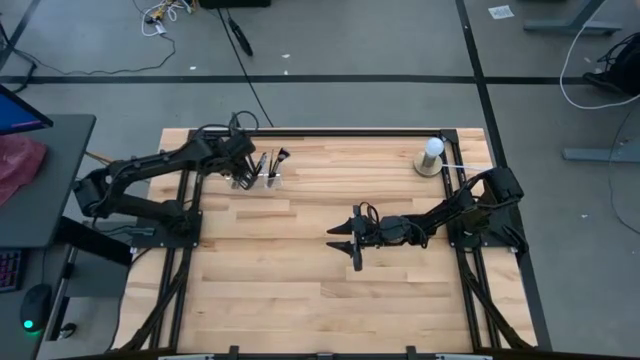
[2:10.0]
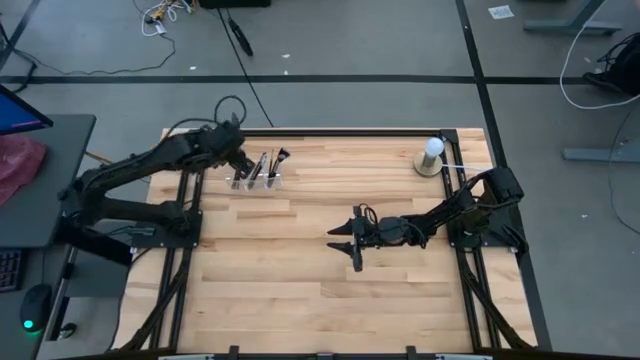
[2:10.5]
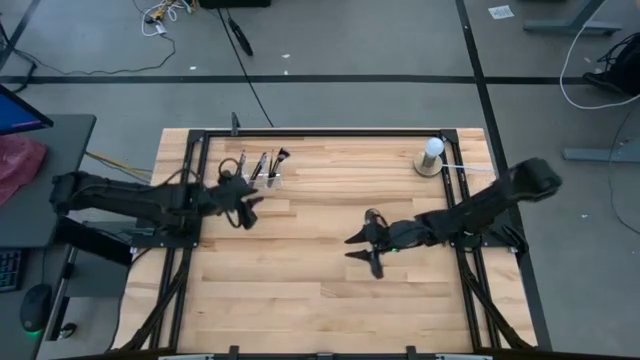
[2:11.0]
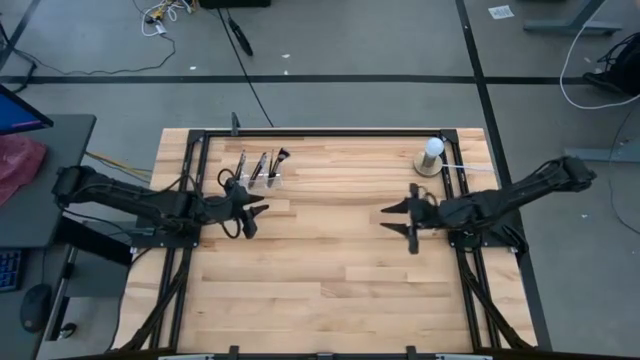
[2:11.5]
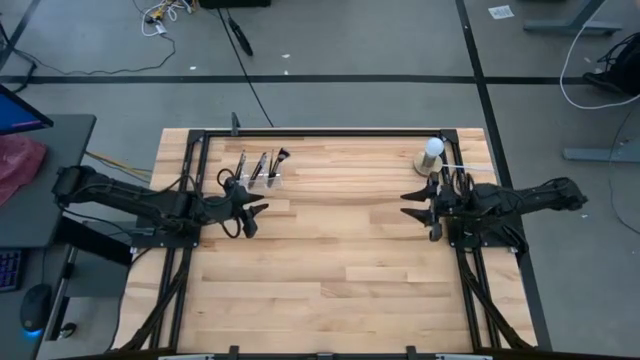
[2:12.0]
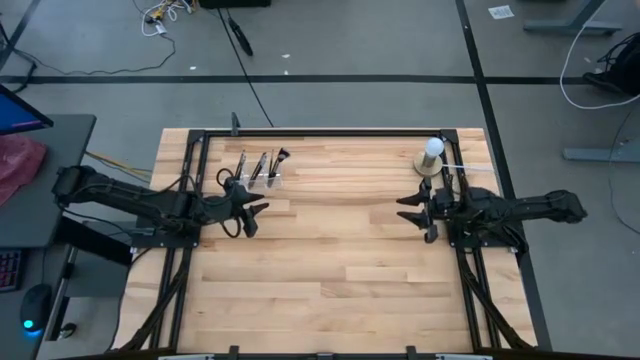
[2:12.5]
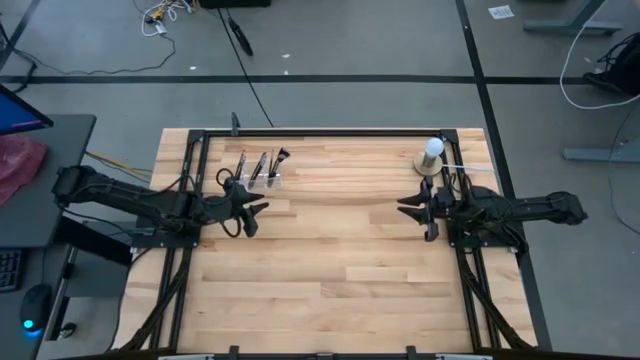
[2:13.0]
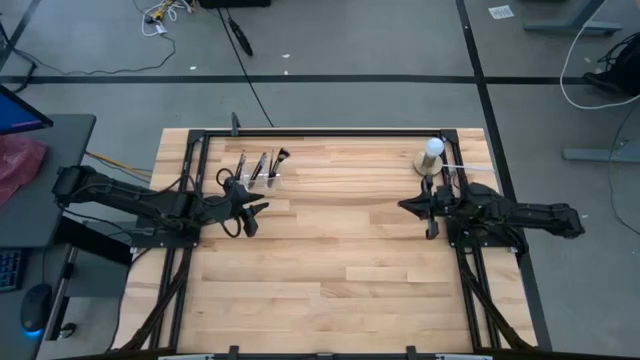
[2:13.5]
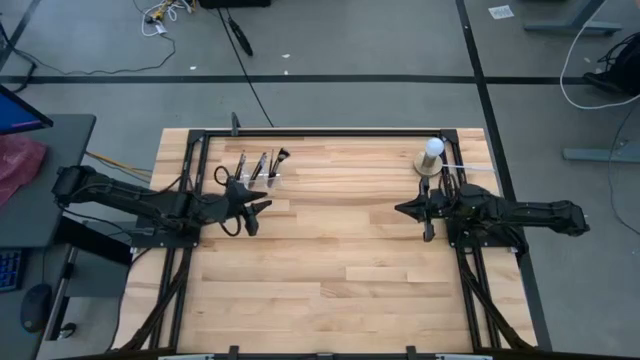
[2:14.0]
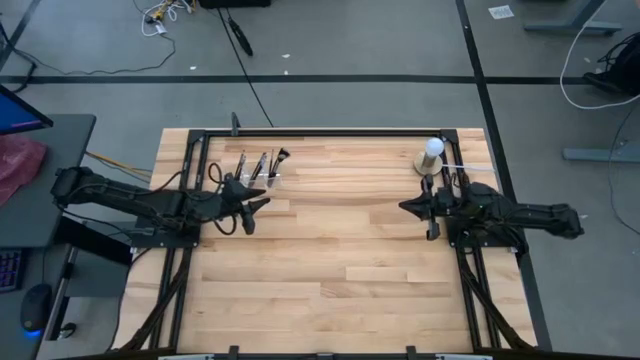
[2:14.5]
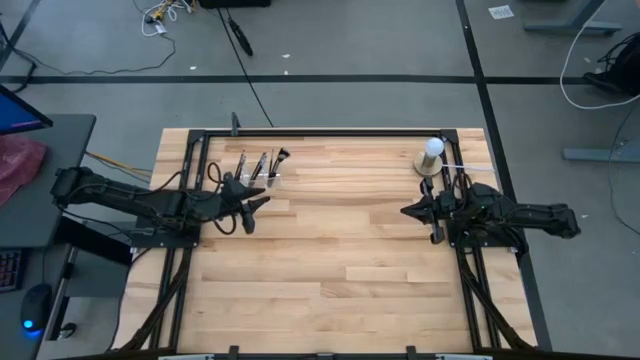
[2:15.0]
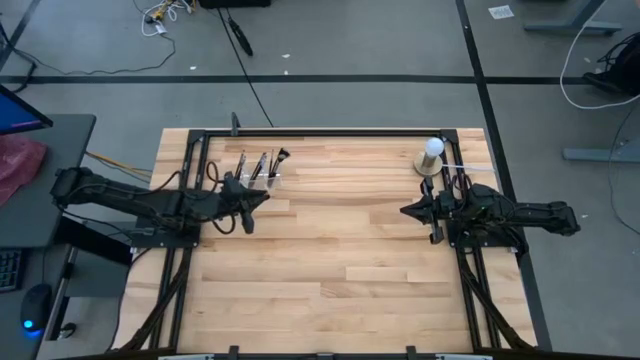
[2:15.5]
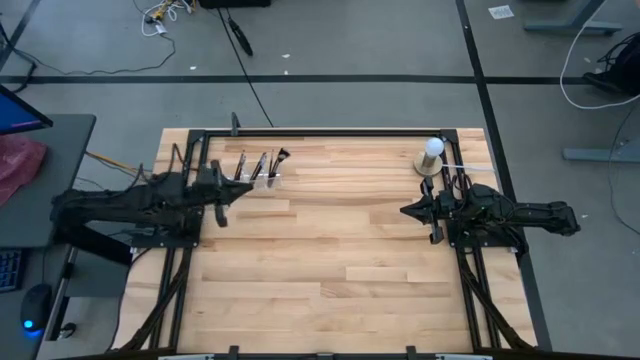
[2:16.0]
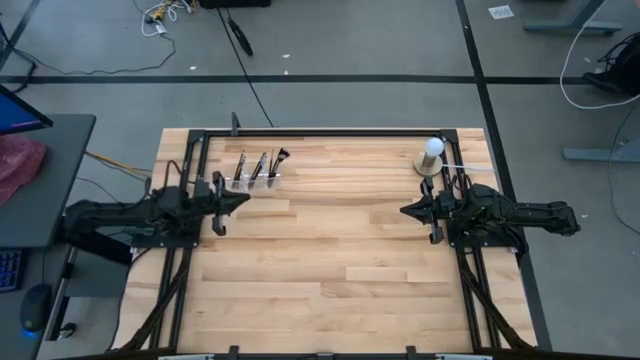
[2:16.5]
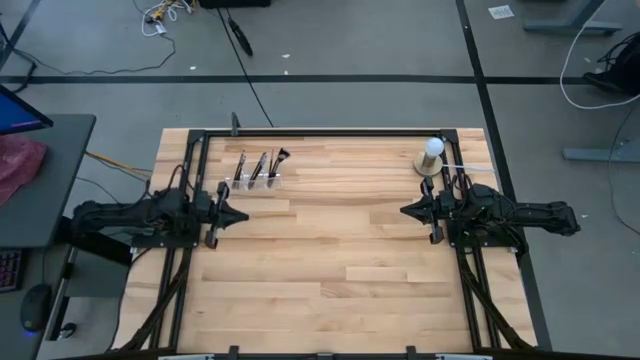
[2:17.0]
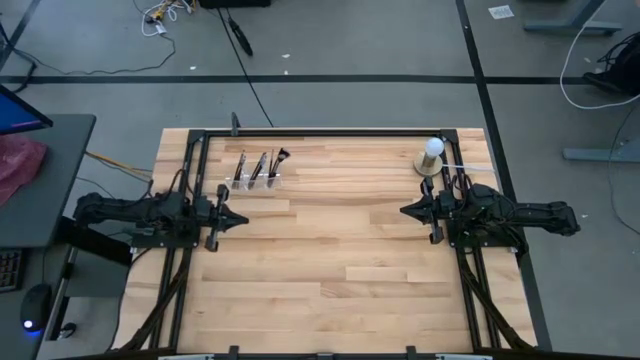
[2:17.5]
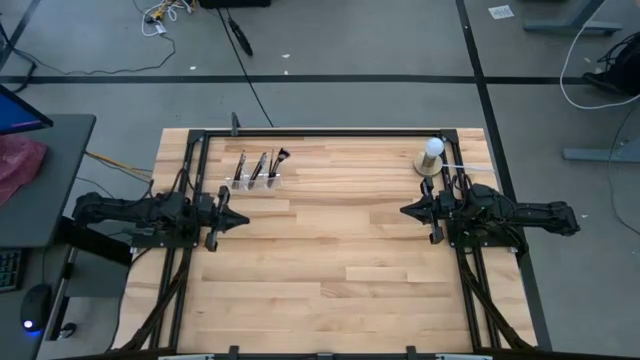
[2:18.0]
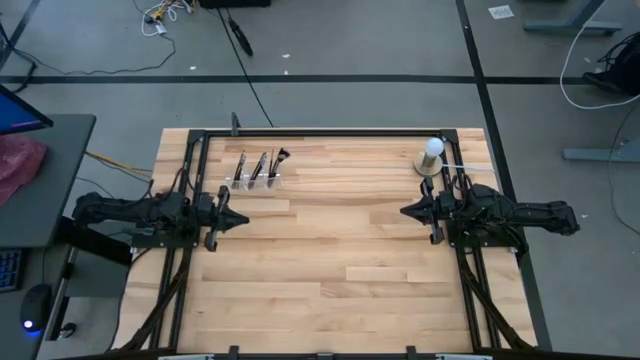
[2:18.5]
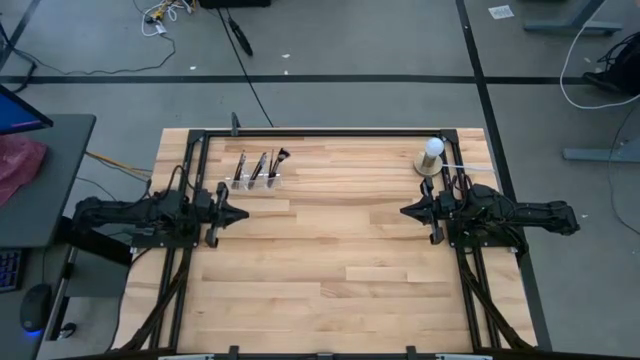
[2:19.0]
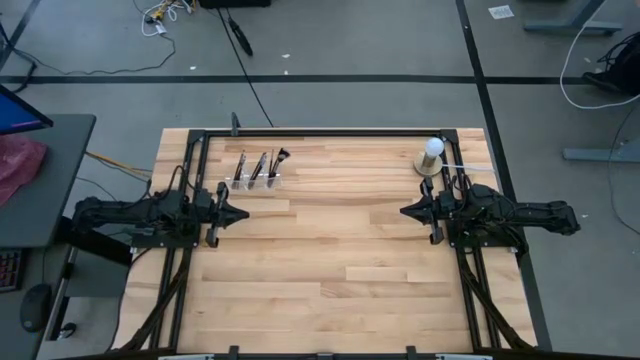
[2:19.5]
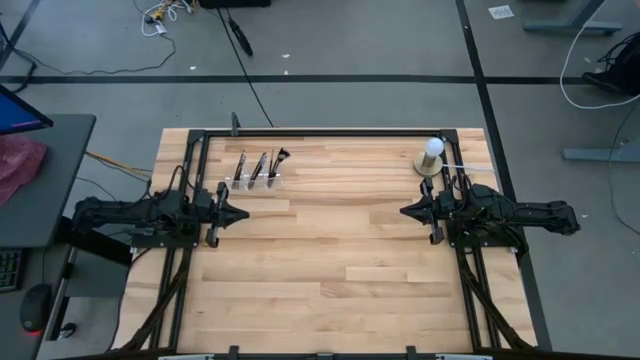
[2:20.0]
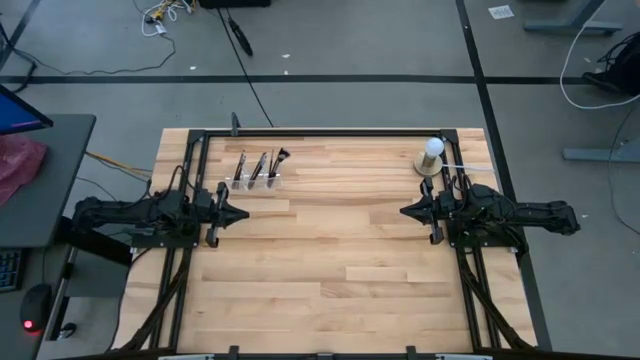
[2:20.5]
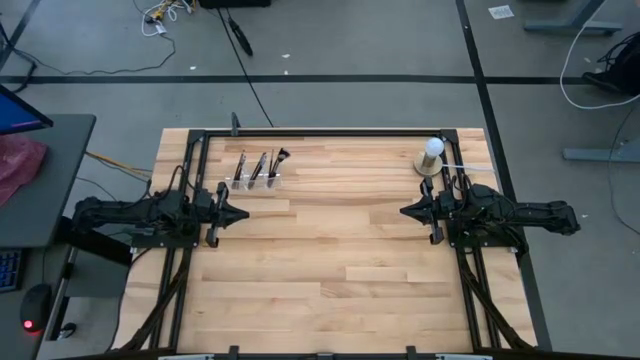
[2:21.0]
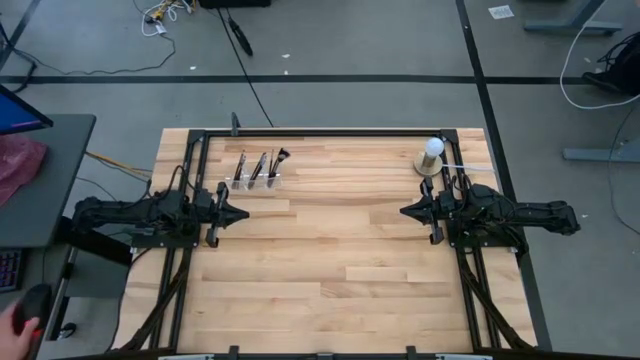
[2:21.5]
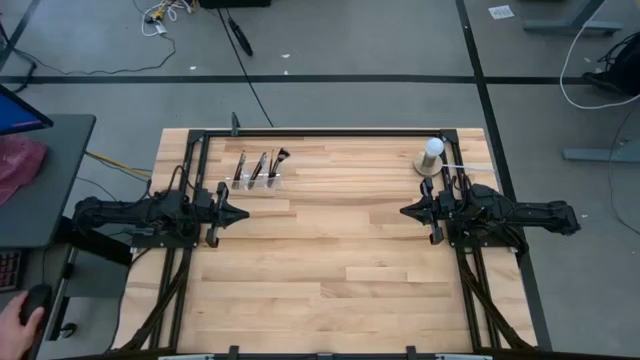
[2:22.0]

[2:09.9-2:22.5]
Task: Put items in baskets/containers
Return to Home Position

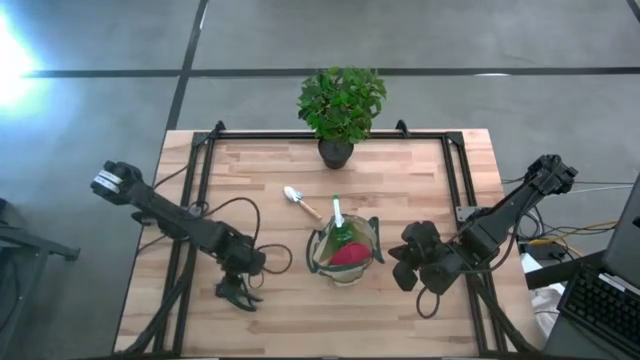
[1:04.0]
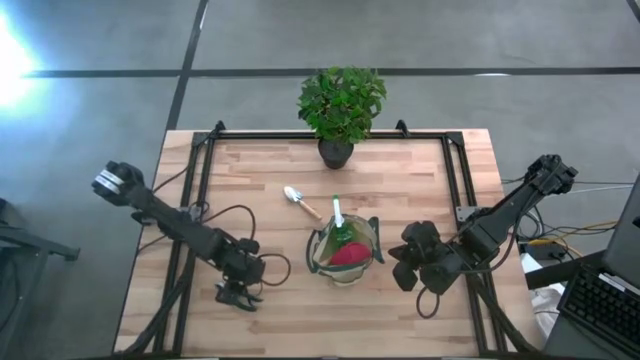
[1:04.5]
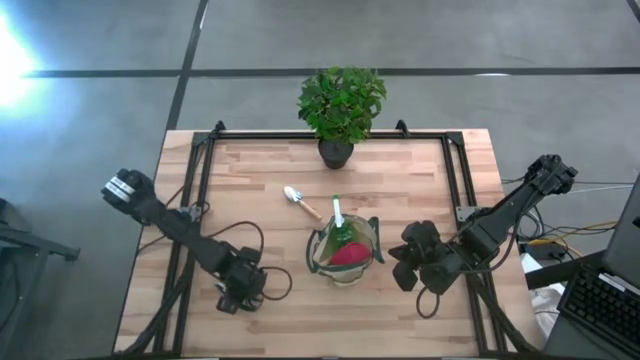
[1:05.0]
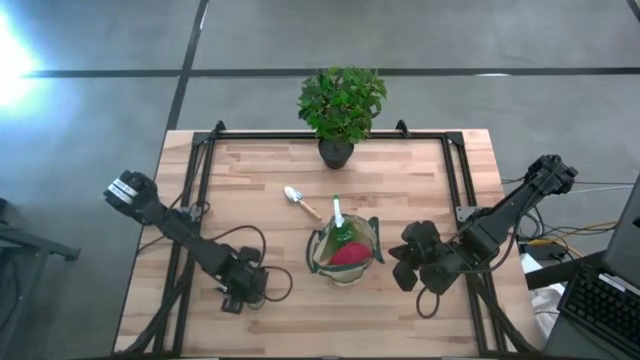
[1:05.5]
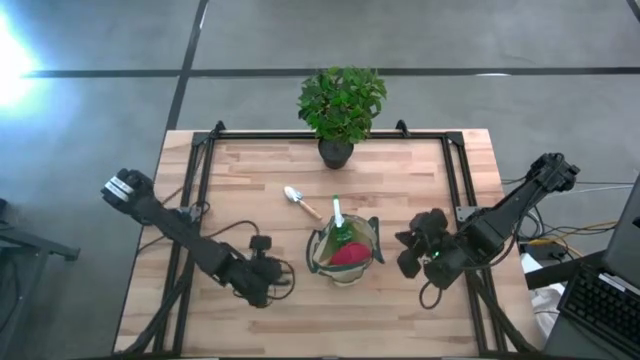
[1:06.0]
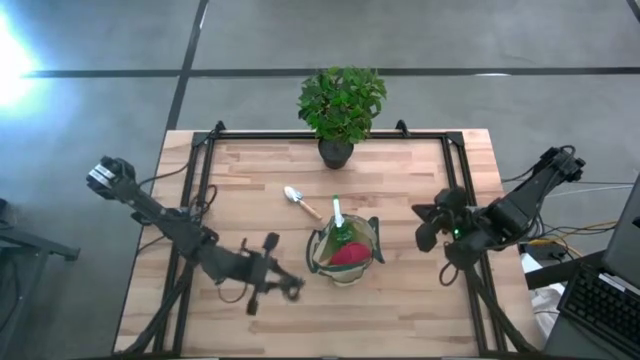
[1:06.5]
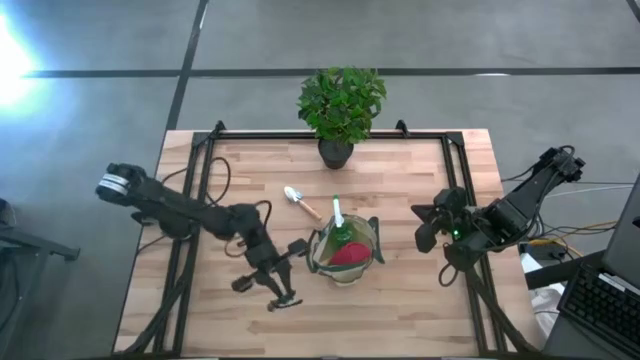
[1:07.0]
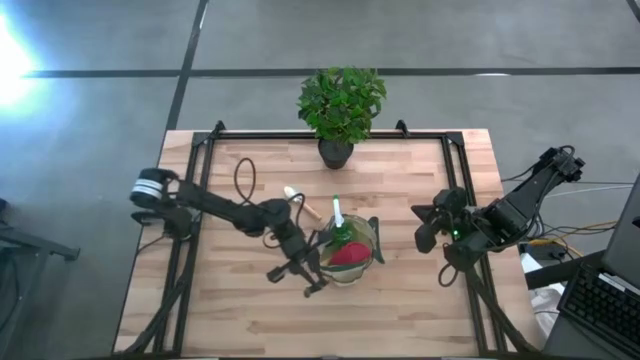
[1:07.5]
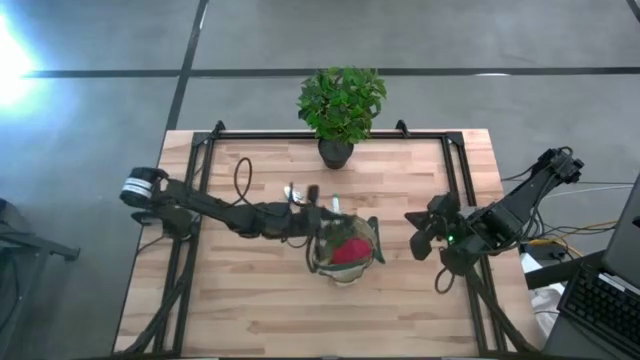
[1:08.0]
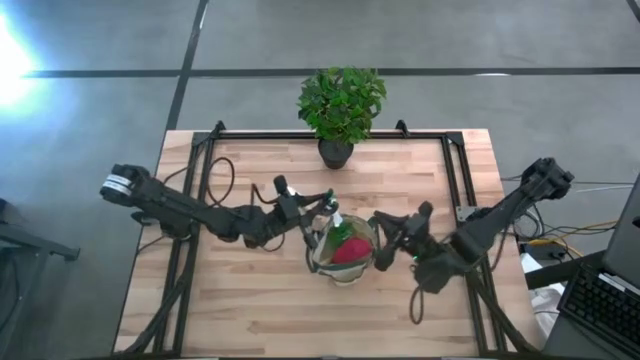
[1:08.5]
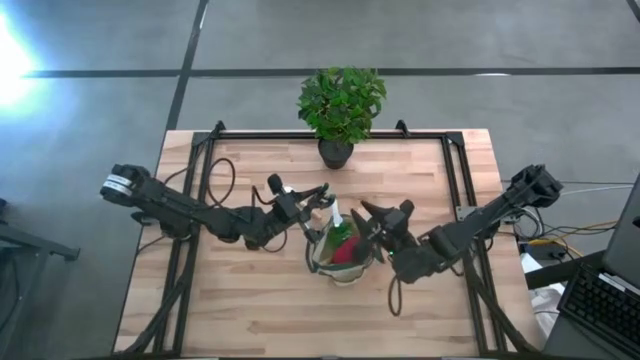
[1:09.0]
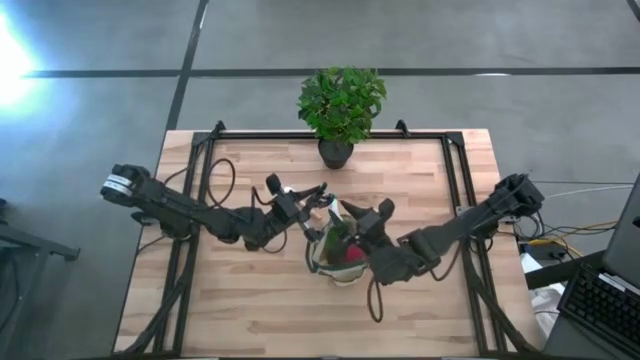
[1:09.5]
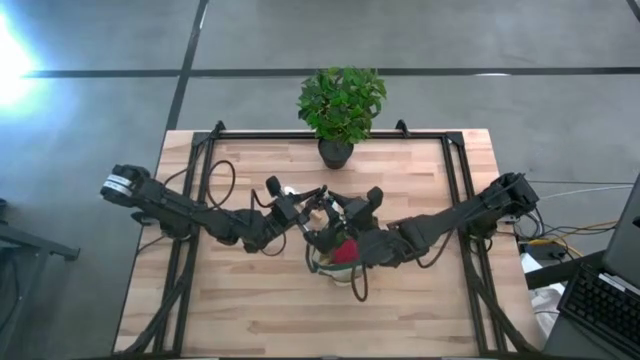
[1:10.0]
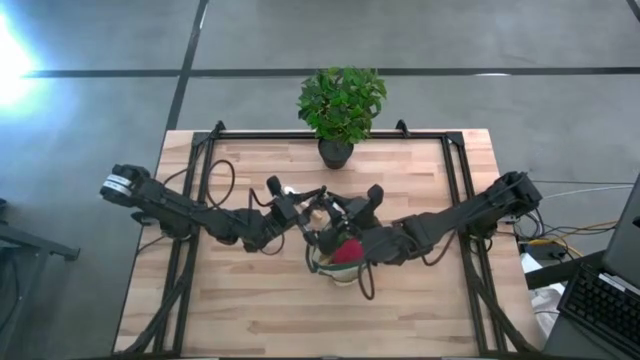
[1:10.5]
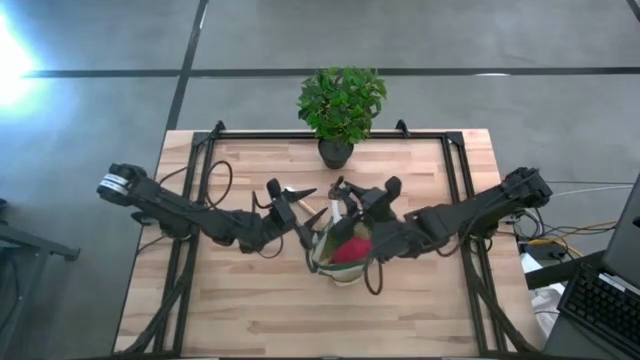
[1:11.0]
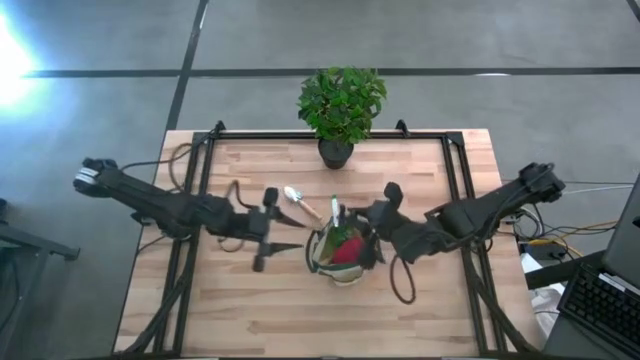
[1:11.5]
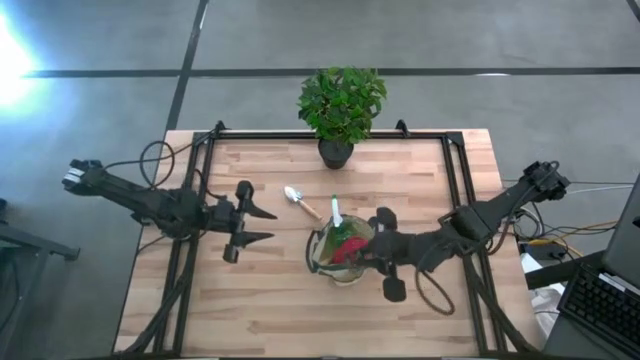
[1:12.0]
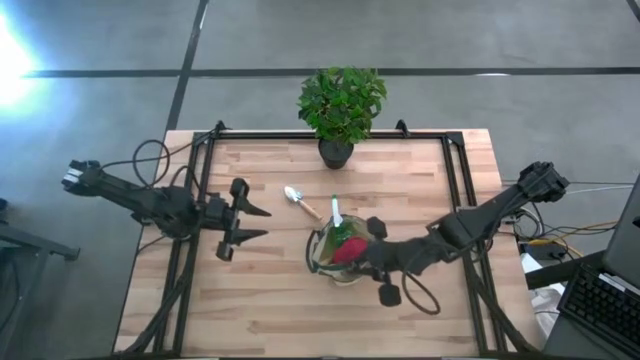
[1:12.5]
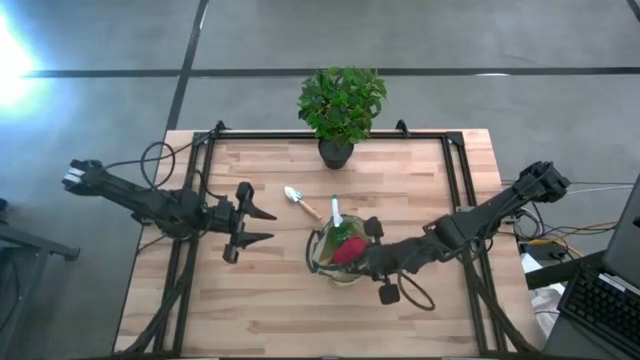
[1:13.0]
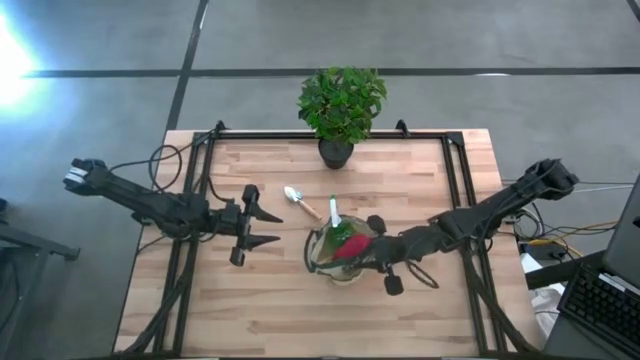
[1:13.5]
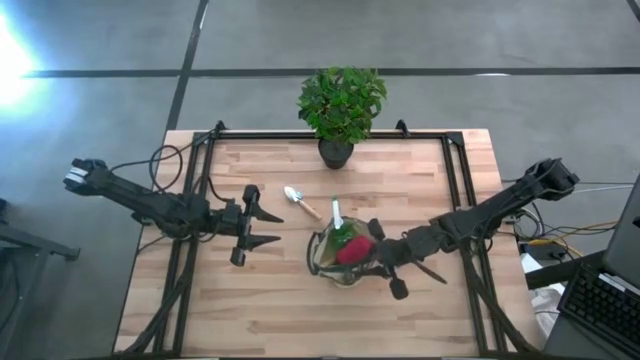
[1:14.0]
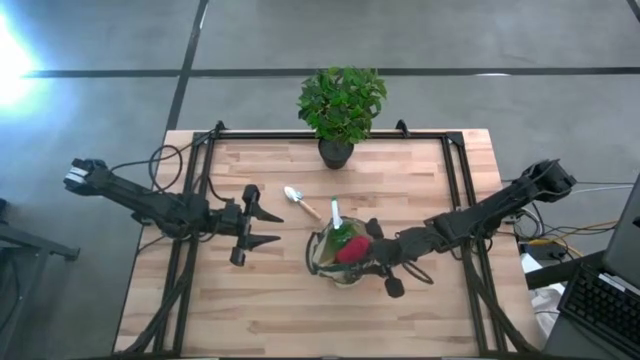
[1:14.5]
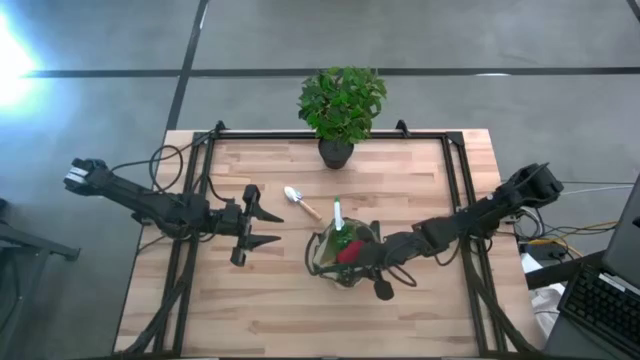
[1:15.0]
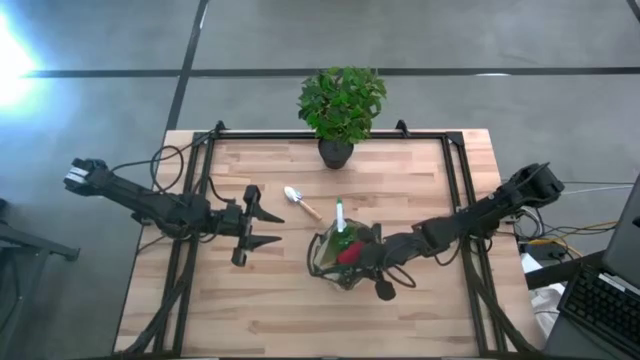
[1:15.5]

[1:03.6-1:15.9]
Task: Pick & Place Garden tools in Gardening bag
Put the green shear scissors into the gardening bag
